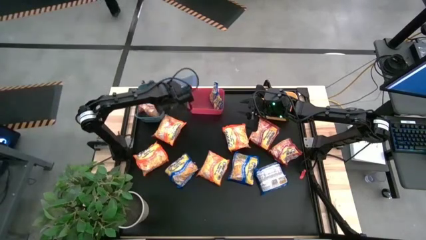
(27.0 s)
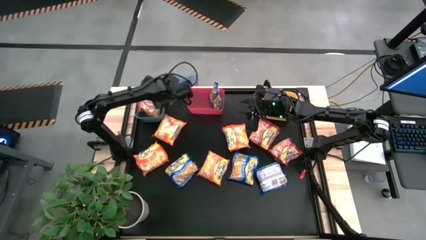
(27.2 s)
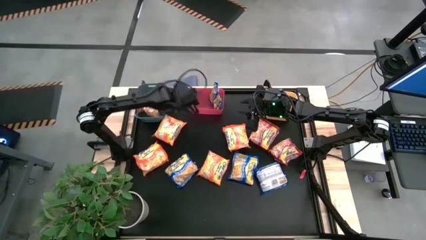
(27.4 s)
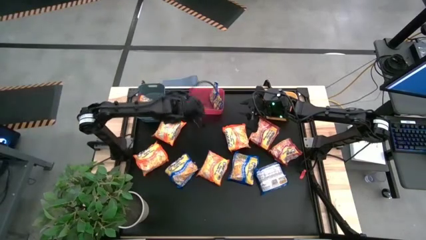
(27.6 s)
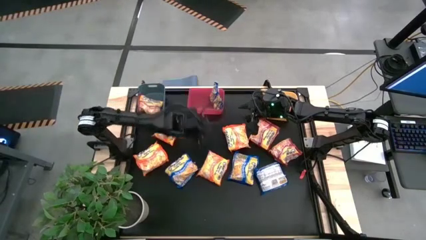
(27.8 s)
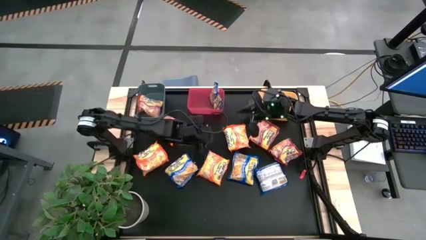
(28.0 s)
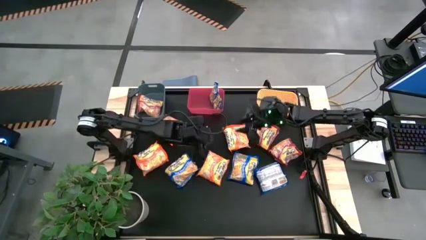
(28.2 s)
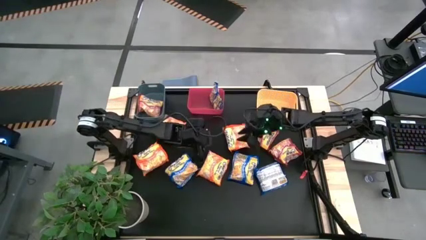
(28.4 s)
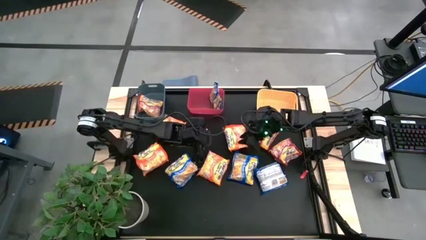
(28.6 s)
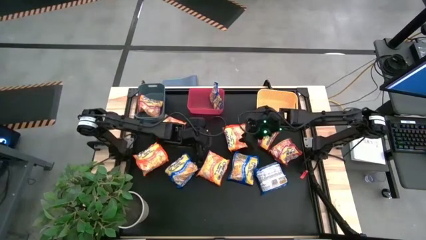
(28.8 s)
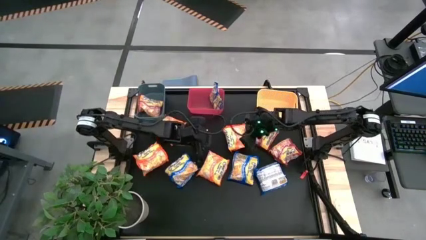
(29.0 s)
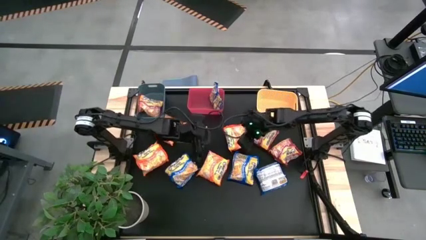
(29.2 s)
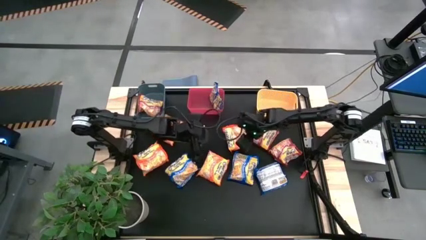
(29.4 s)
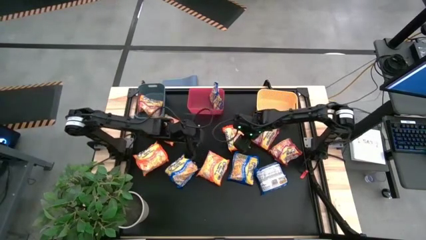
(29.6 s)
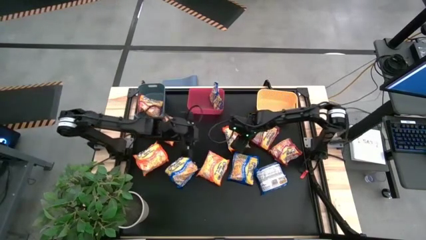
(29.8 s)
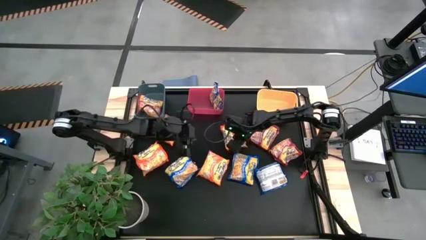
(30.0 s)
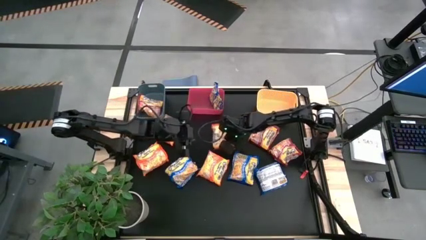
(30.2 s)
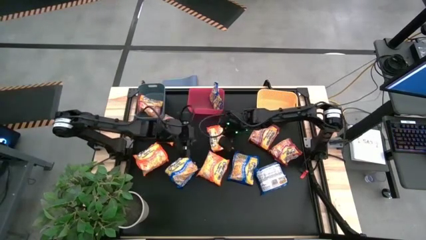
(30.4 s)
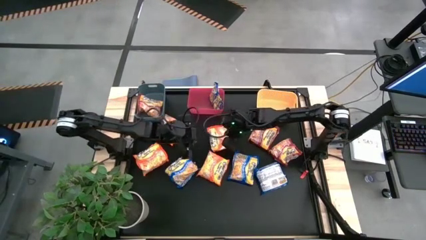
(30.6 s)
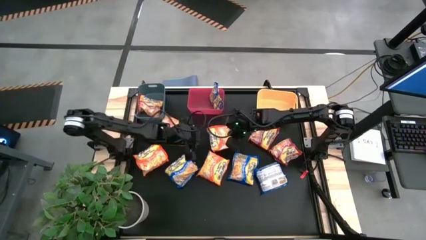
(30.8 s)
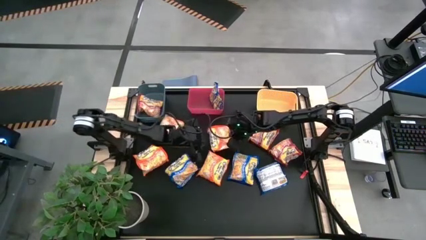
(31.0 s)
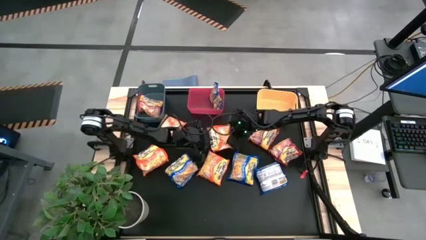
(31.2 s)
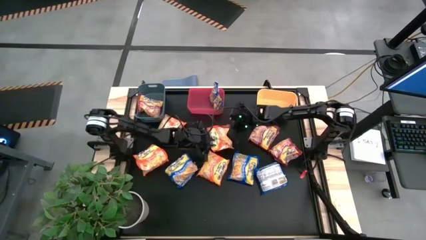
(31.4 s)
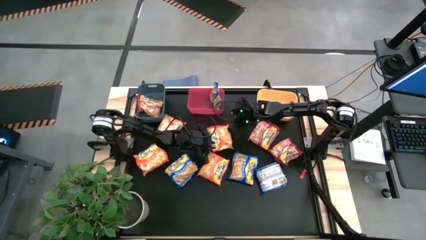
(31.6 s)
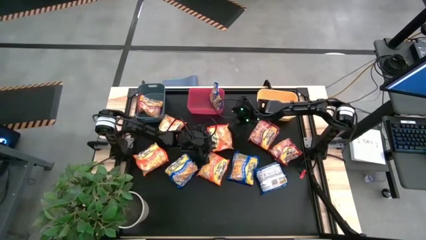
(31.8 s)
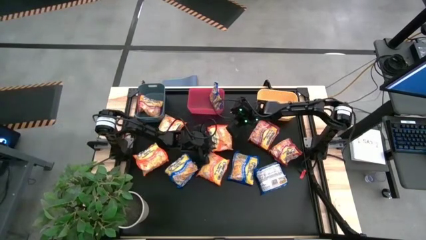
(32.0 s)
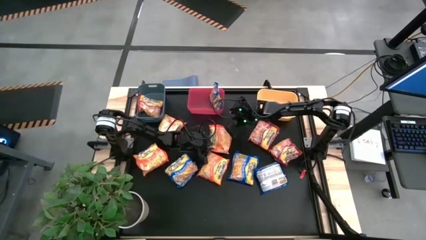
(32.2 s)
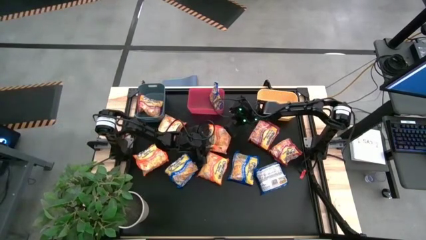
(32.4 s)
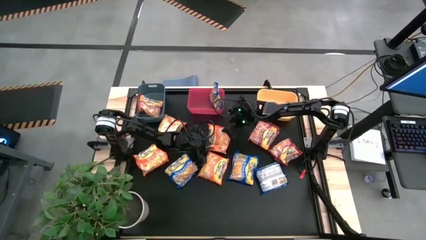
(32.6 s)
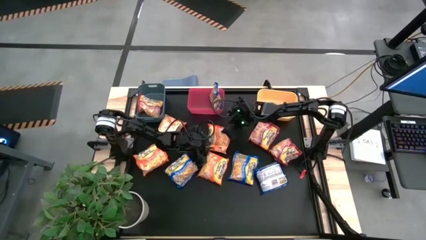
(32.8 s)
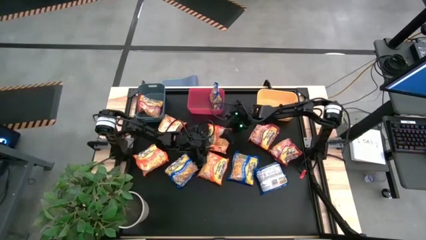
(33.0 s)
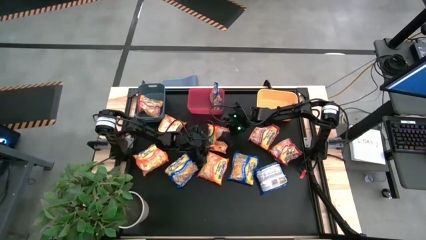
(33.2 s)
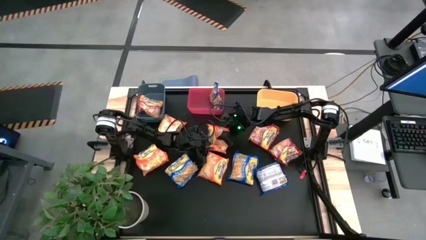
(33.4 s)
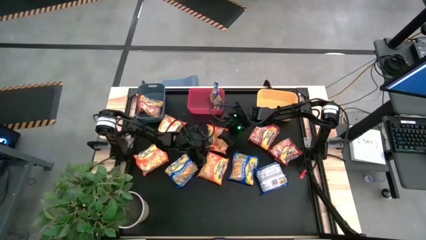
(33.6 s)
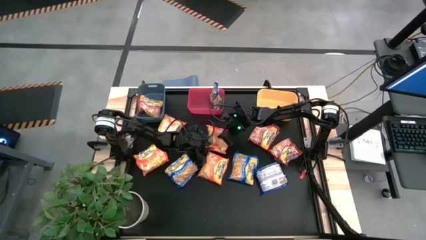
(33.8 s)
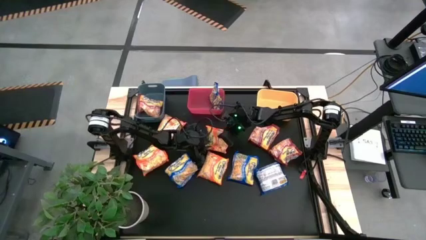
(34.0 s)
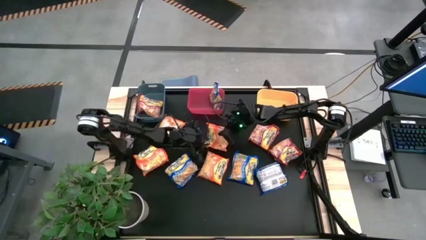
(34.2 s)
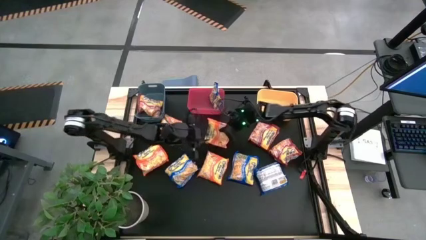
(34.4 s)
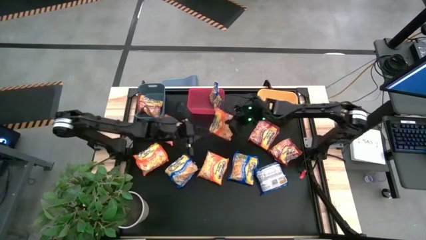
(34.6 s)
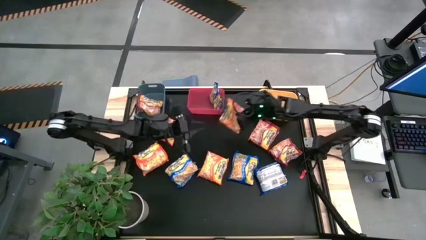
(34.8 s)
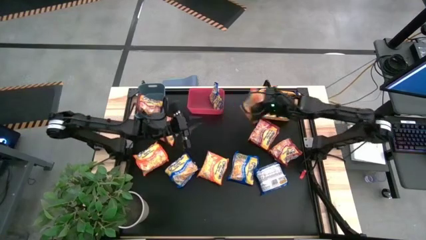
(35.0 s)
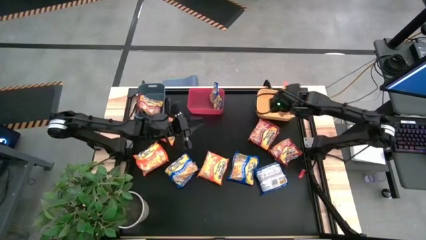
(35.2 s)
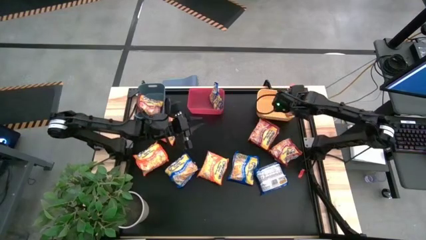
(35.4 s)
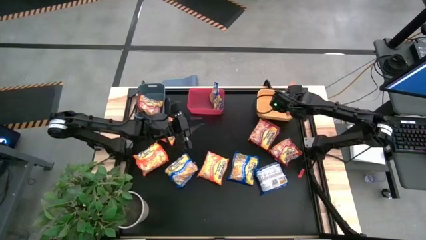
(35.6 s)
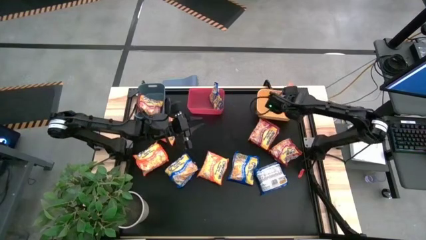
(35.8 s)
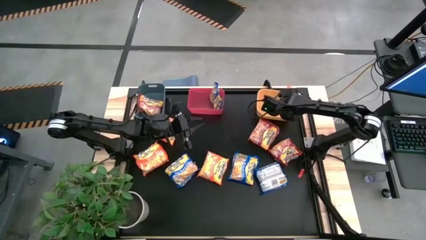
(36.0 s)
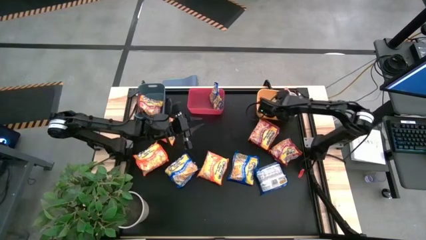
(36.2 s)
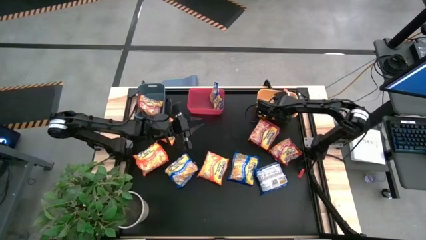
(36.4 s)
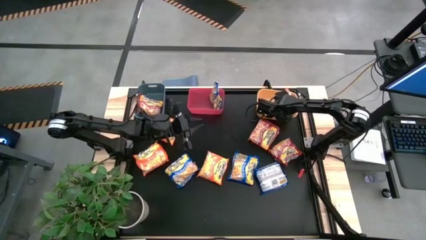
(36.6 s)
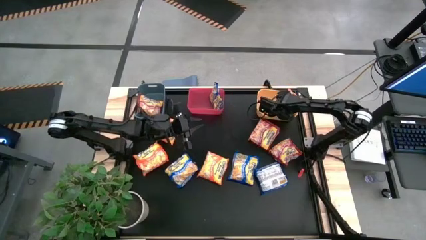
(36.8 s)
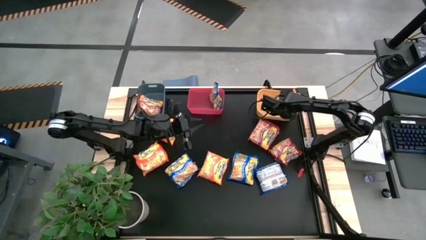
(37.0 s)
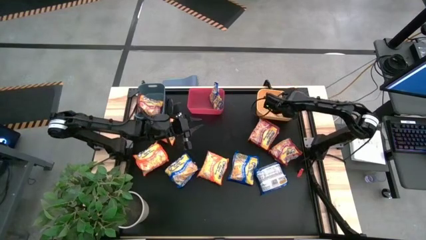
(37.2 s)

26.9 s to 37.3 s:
Task: Sort Maruchan noodles
Put the orange noodle pack into the yellow bin
